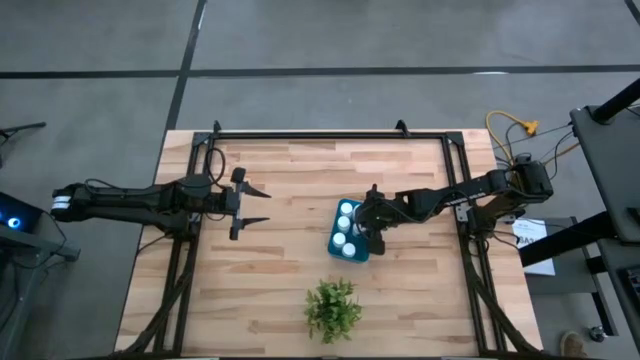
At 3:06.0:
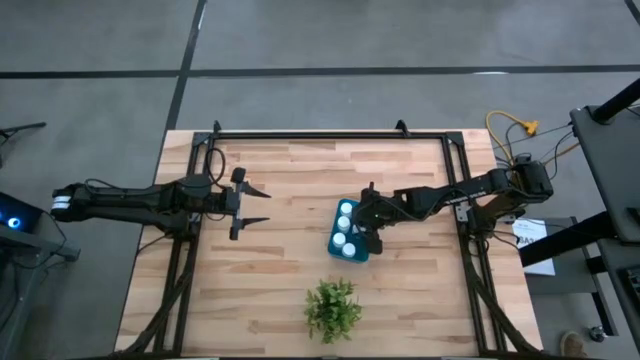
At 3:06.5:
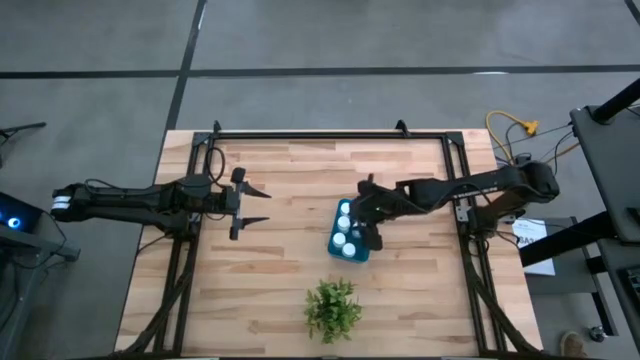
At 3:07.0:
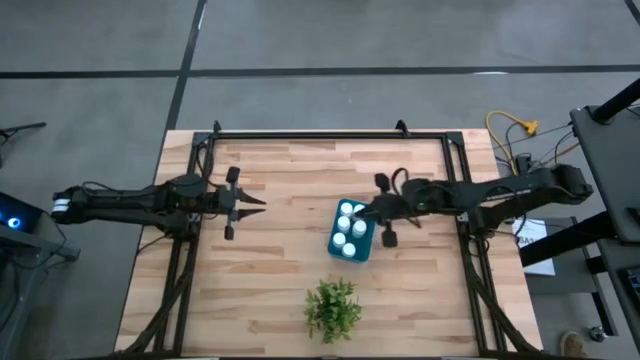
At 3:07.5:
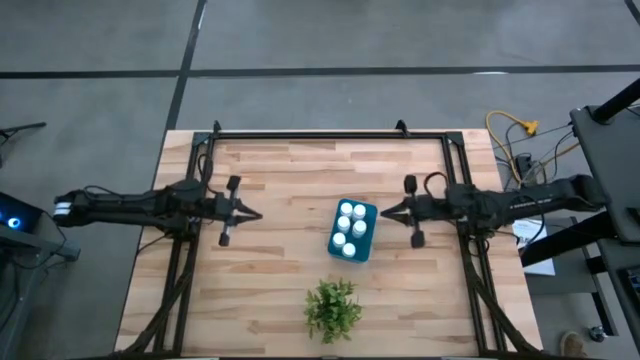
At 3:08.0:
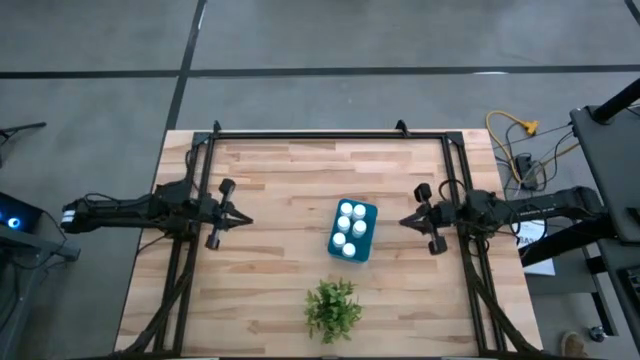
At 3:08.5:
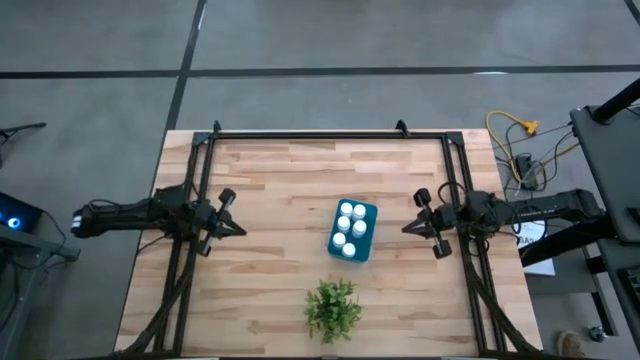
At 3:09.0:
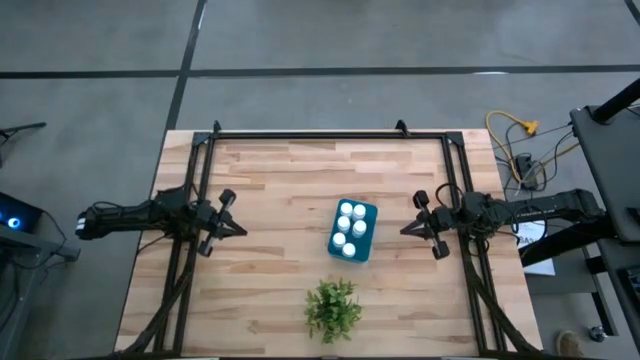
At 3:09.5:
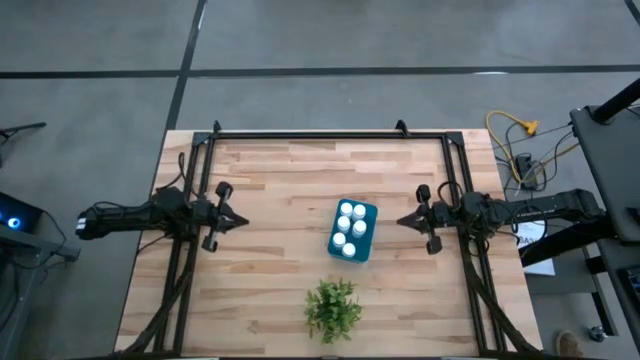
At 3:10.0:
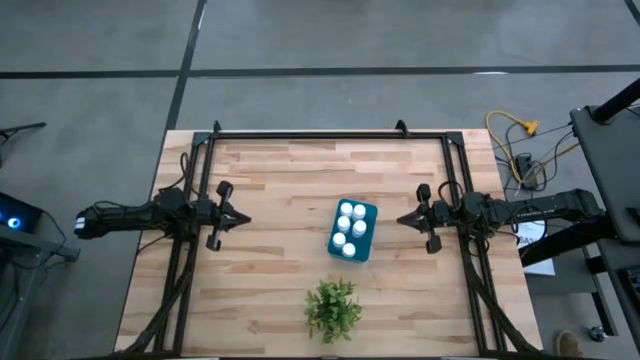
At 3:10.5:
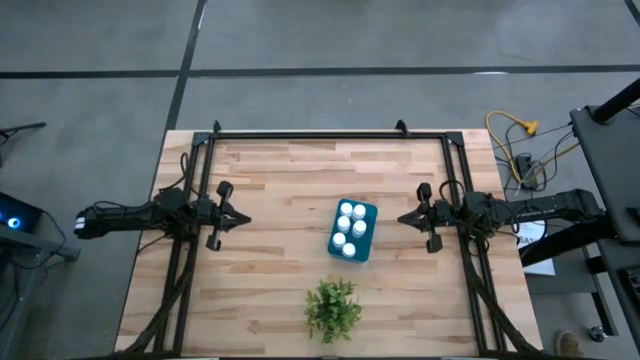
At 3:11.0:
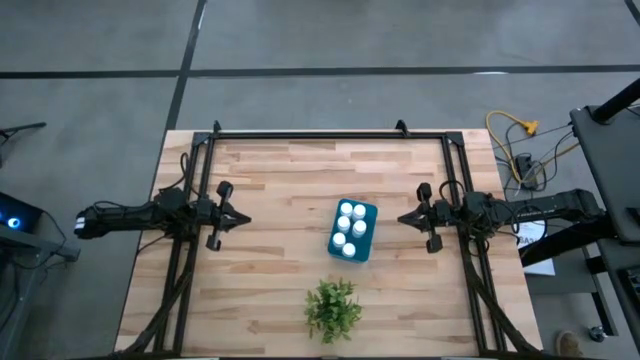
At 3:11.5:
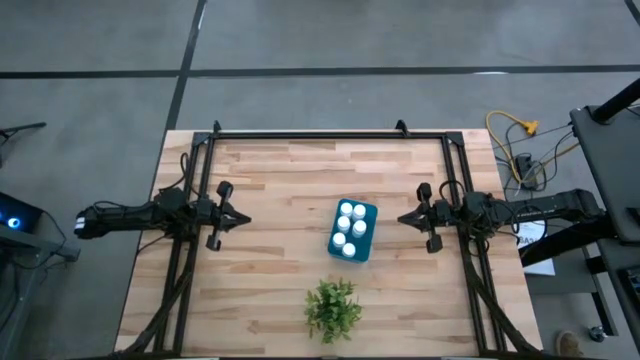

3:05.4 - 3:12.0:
Task: Pick and place pill bottles into a basket
Return to Home Position

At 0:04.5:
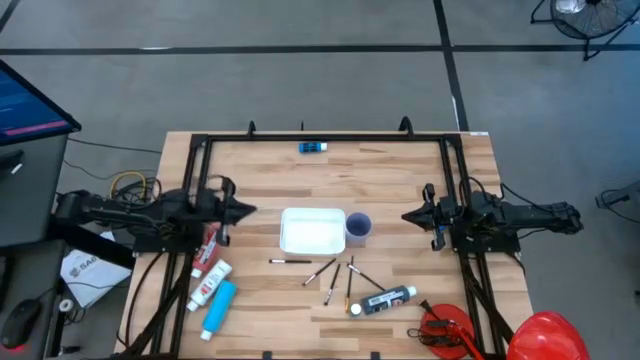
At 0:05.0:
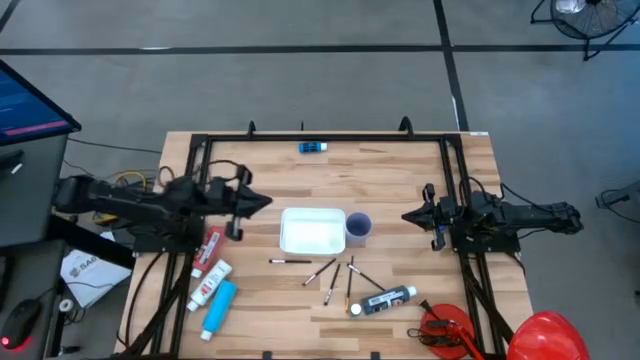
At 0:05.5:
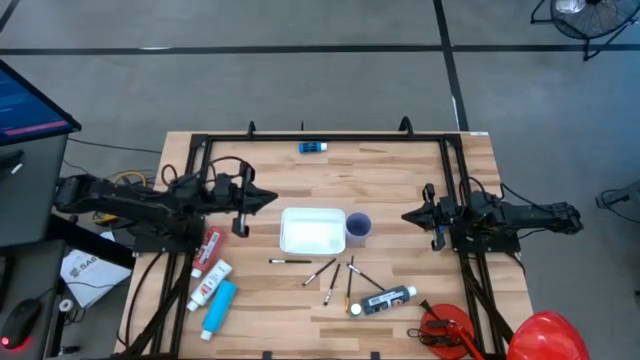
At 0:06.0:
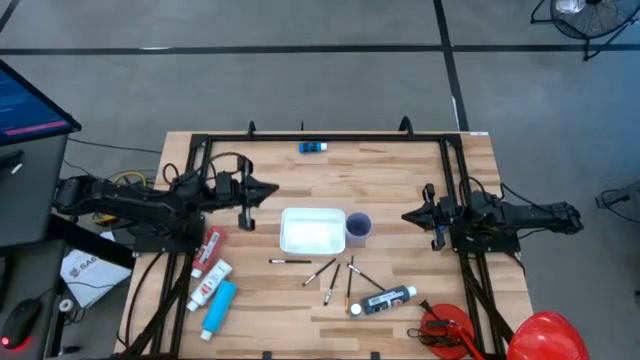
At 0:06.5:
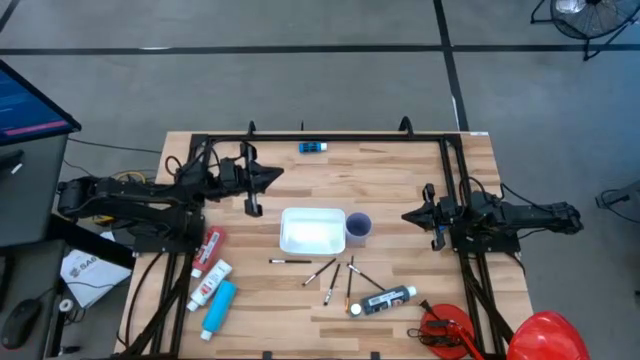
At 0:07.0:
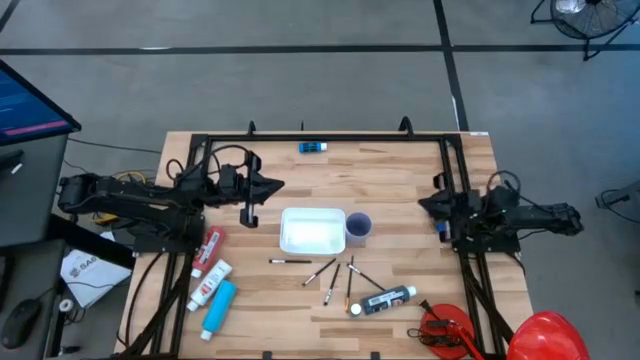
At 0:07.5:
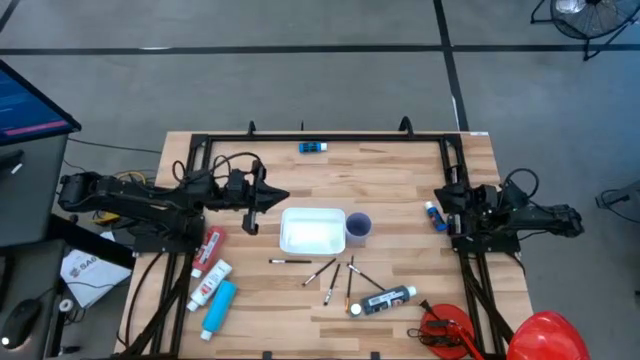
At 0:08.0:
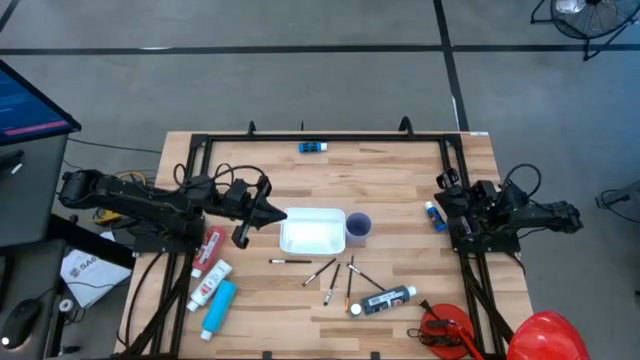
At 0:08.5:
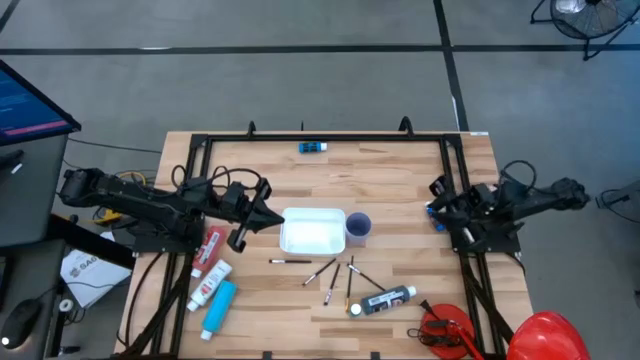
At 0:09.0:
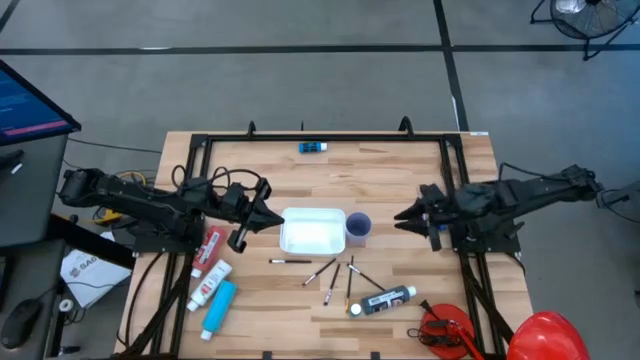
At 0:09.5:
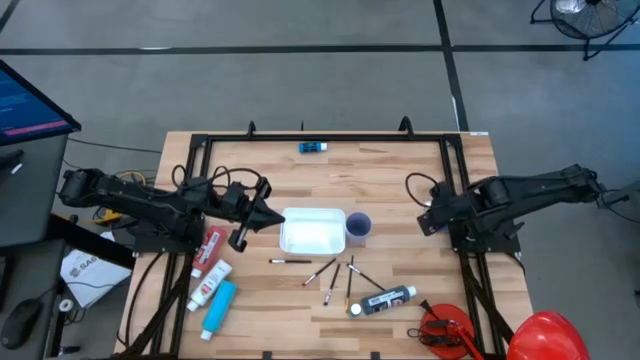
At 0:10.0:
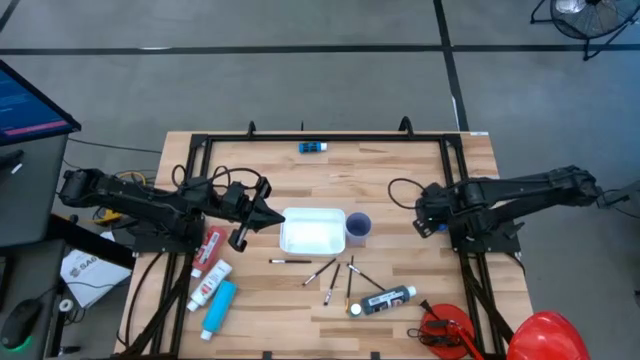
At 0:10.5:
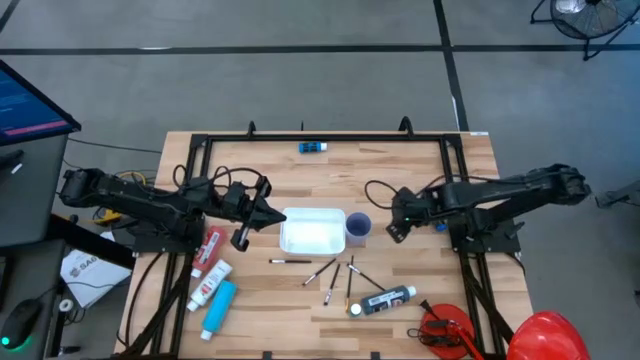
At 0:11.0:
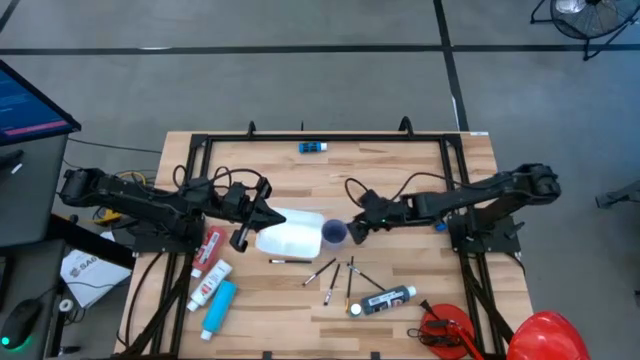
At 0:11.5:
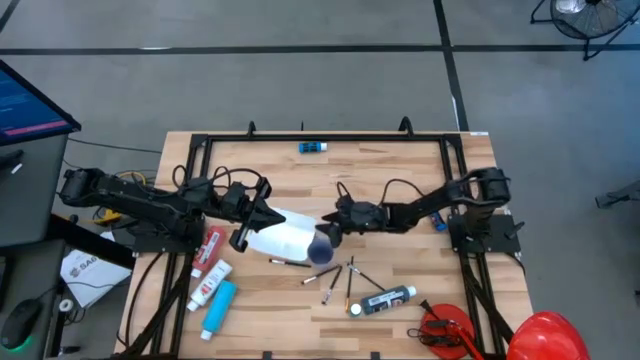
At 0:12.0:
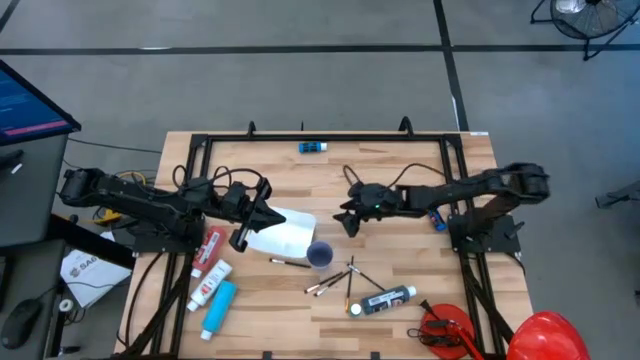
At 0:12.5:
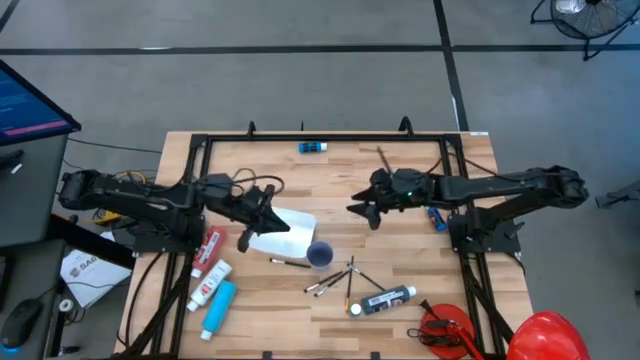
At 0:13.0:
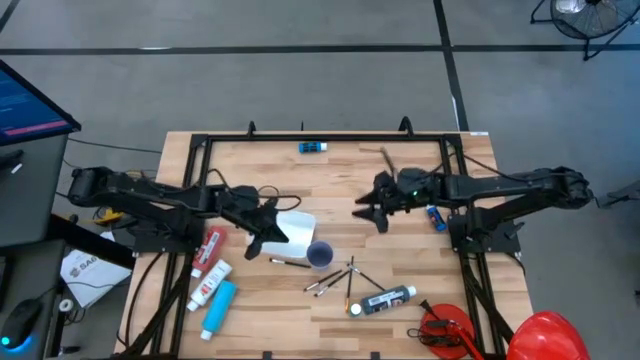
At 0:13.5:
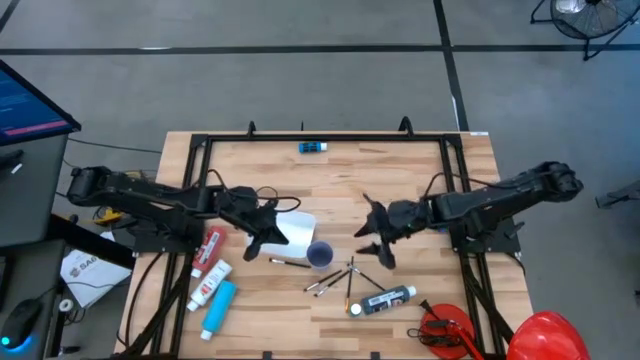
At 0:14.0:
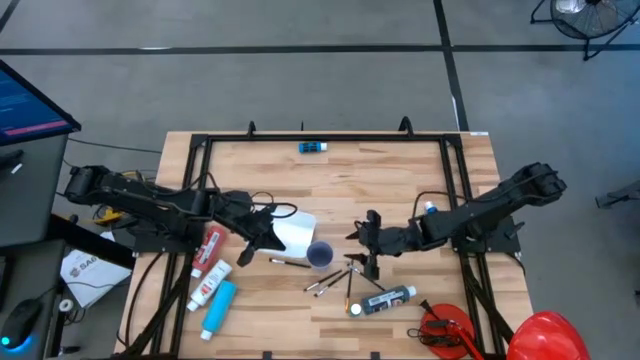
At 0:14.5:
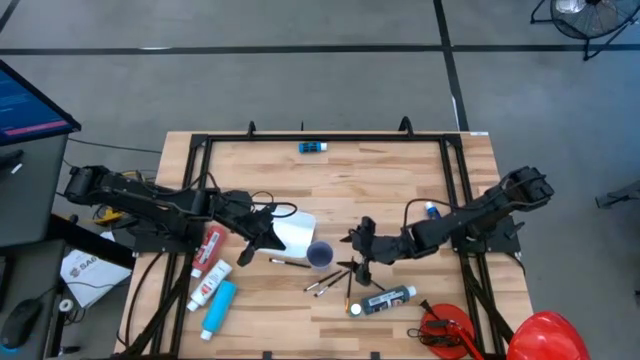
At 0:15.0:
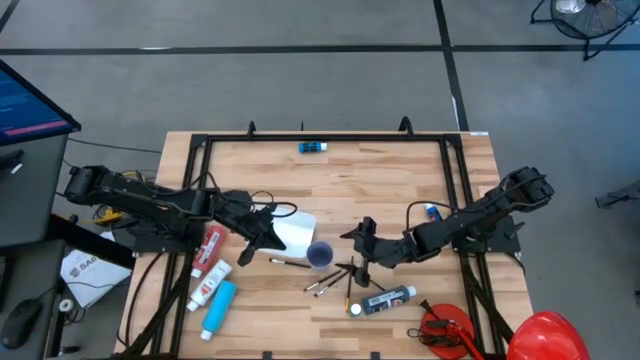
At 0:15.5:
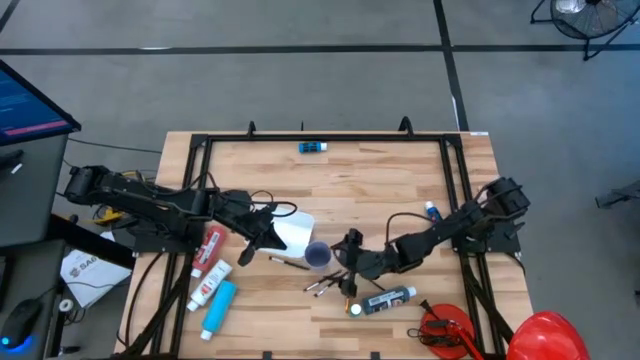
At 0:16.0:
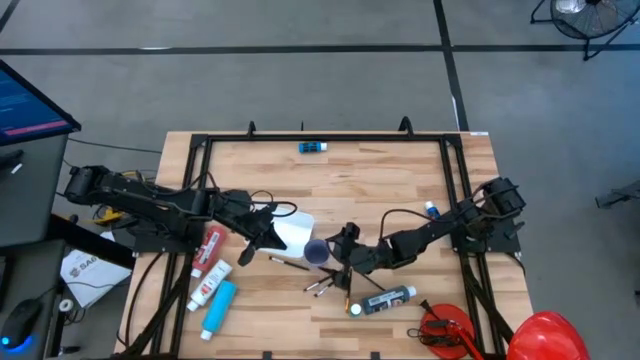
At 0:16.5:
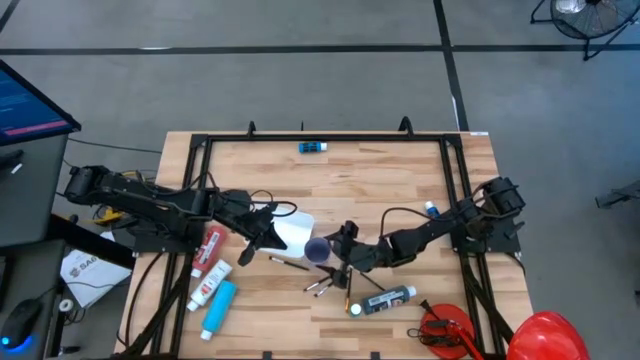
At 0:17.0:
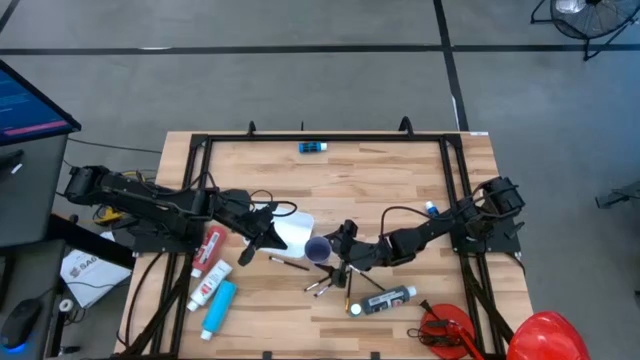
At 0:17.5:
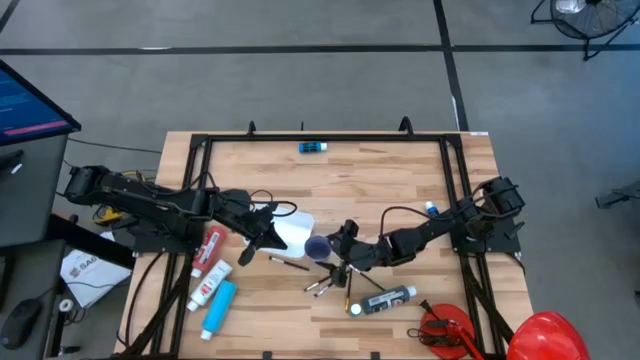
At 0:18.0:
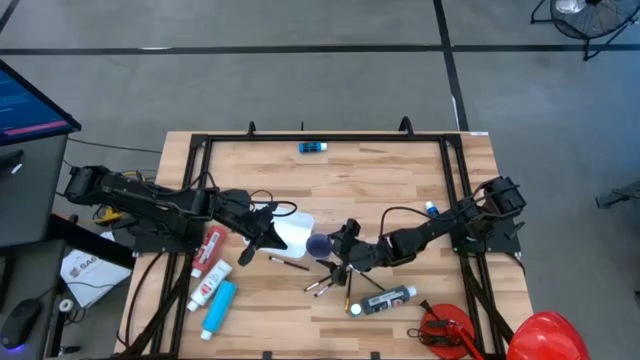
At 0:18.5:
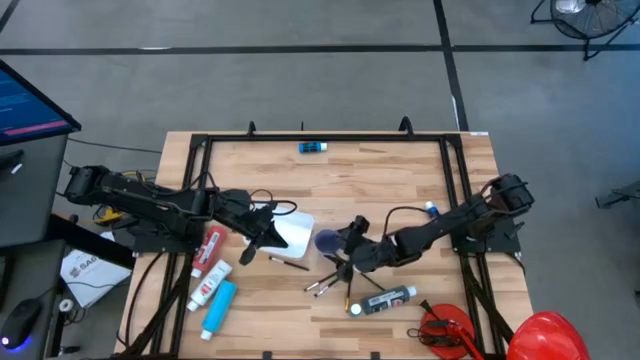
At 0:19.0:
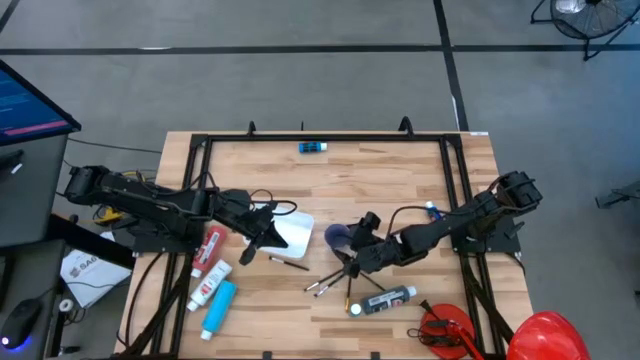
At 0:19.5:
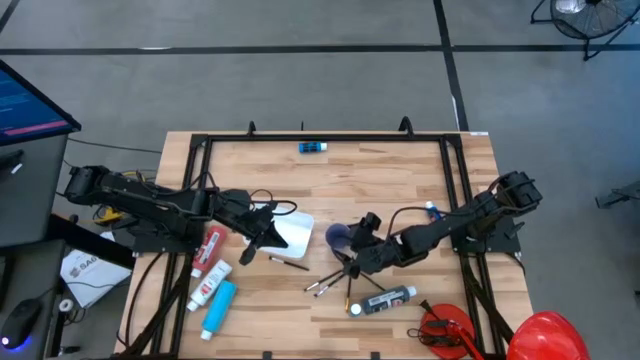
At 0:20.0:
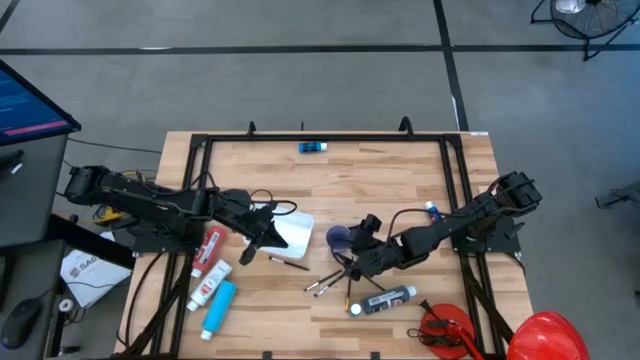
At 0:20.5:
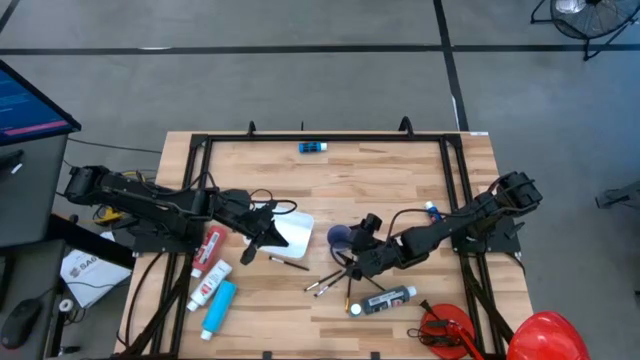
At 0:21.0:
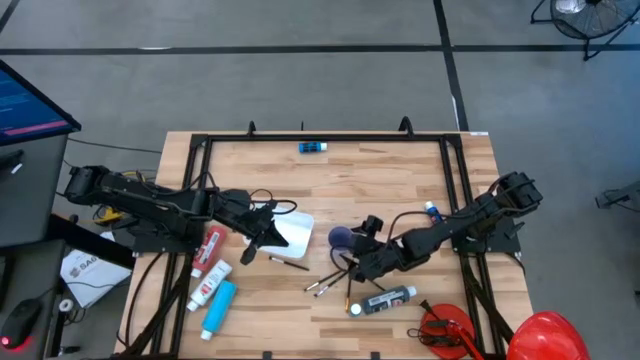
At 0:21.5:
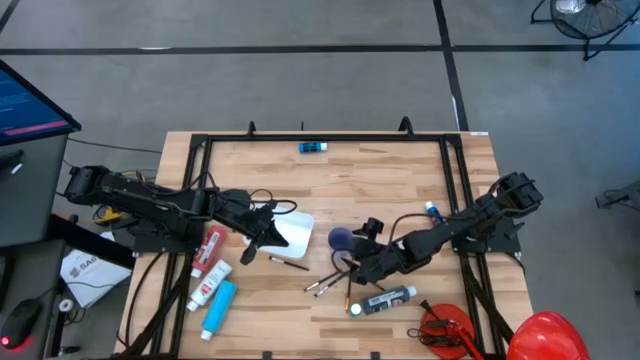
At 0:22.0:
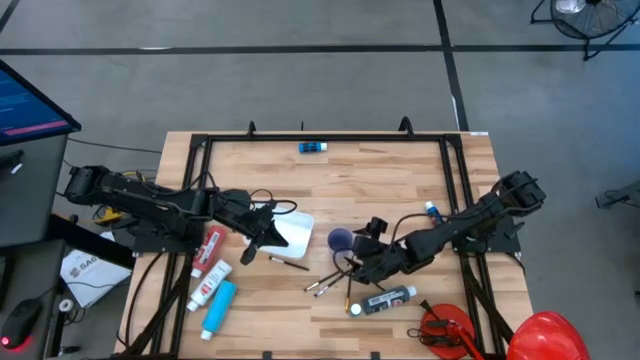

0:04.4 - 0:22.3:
Task: Pick & Place Paint Supplies
Adjust the purple cup
